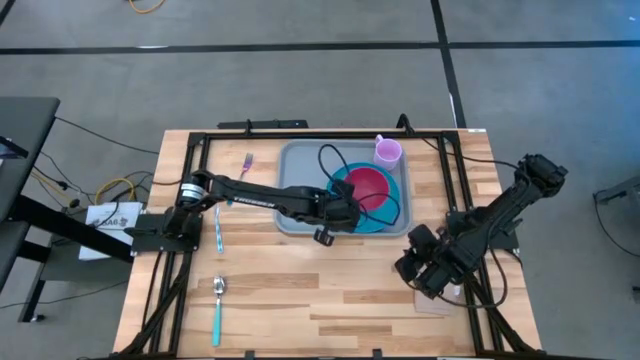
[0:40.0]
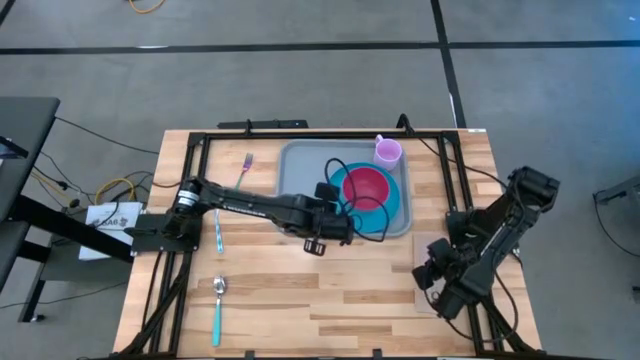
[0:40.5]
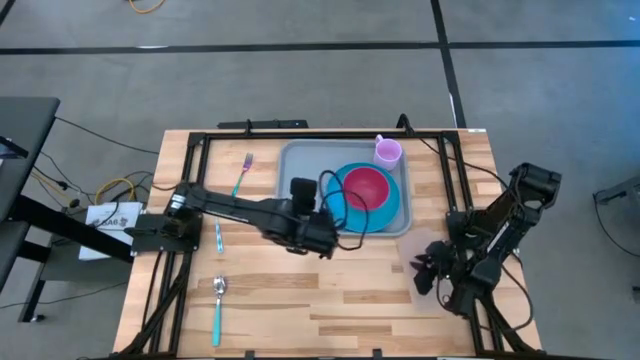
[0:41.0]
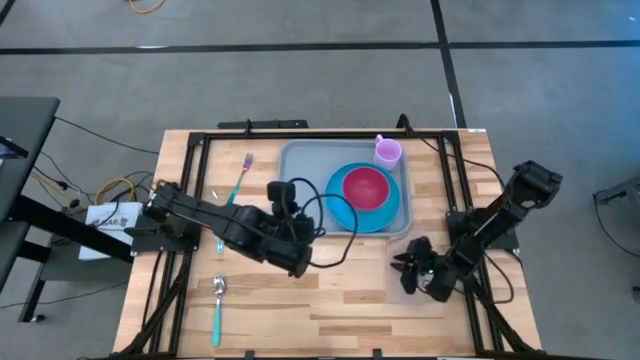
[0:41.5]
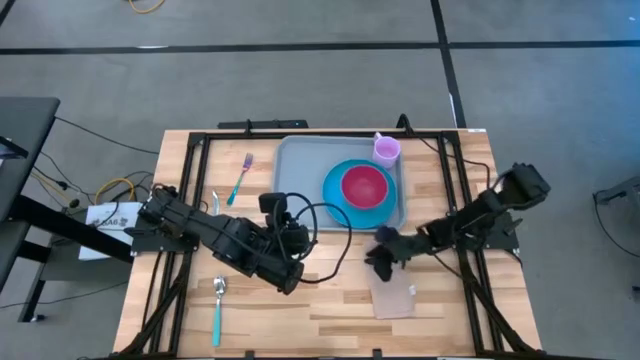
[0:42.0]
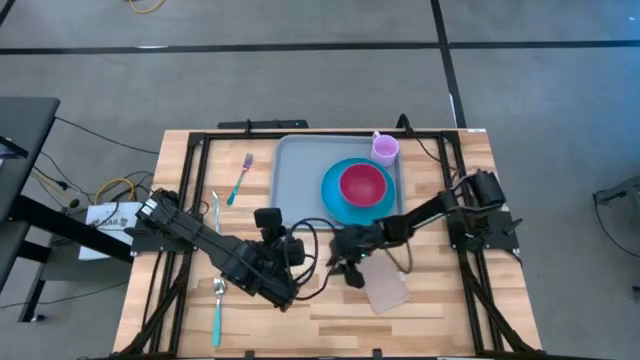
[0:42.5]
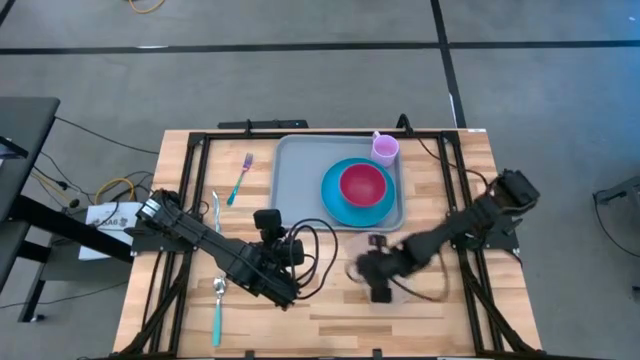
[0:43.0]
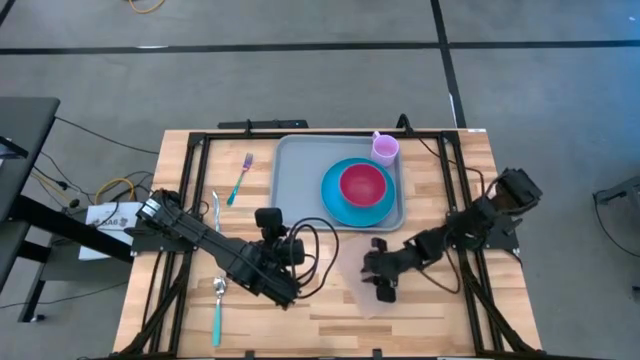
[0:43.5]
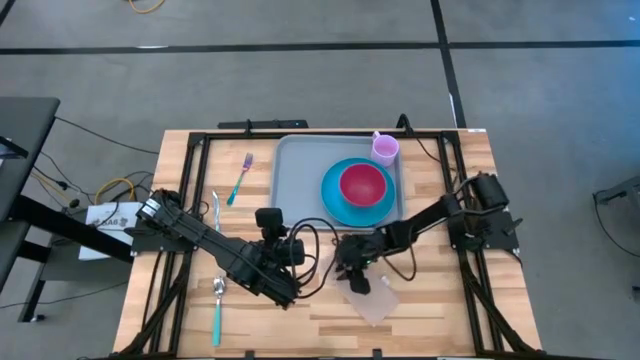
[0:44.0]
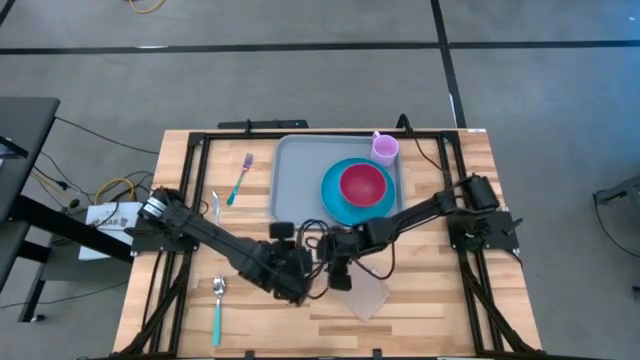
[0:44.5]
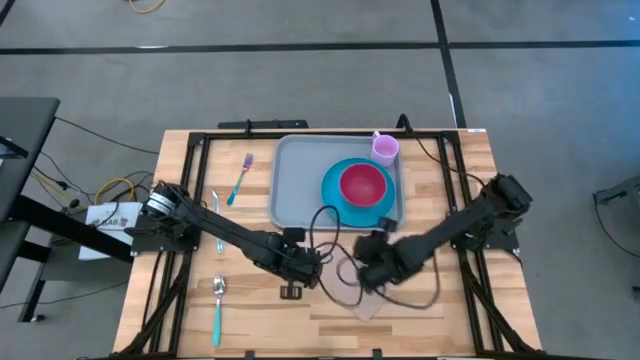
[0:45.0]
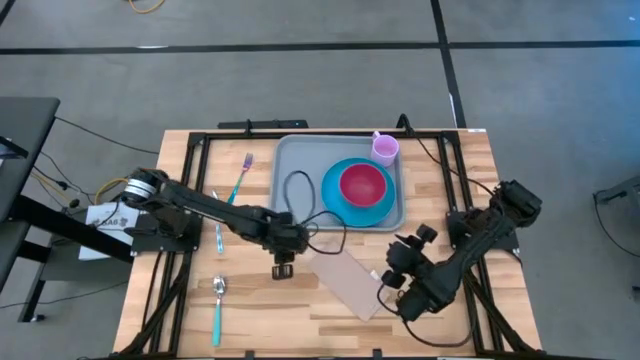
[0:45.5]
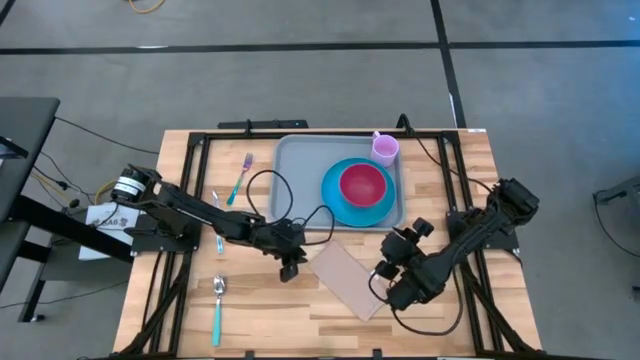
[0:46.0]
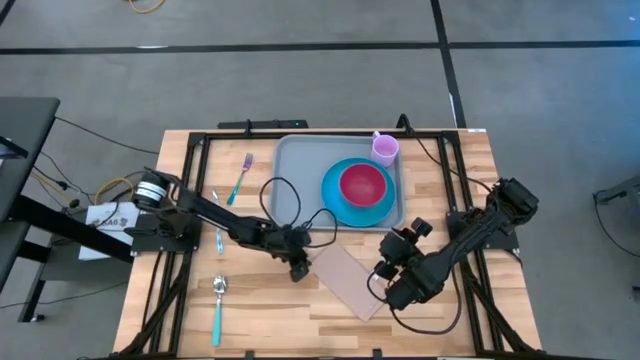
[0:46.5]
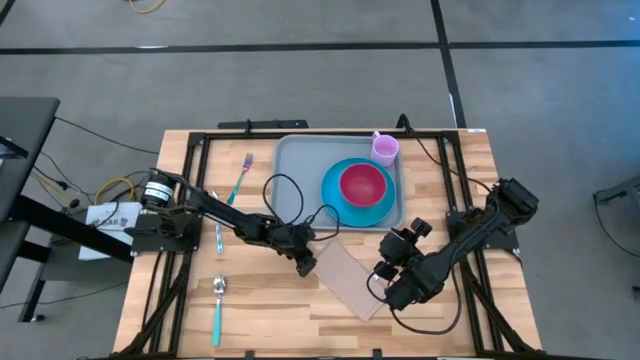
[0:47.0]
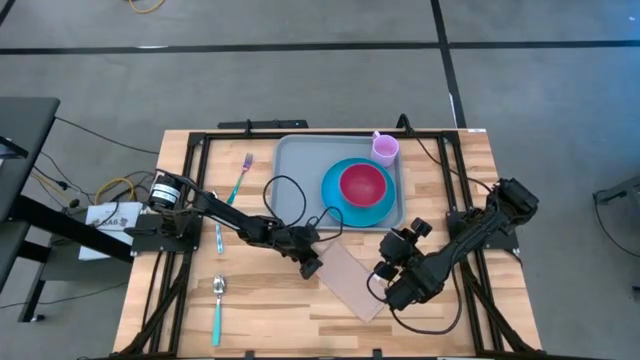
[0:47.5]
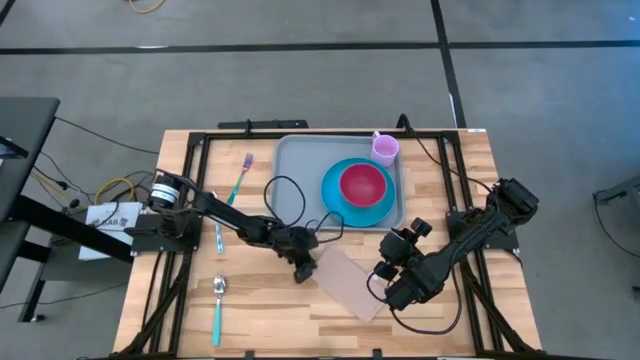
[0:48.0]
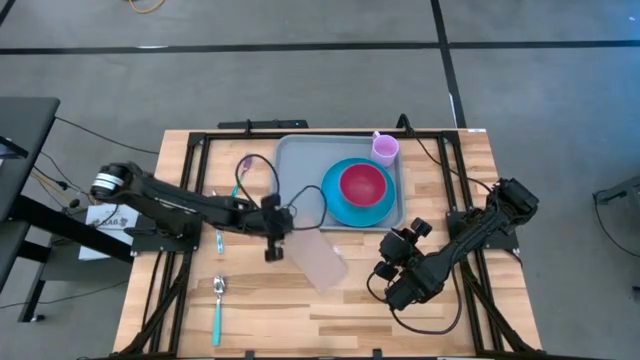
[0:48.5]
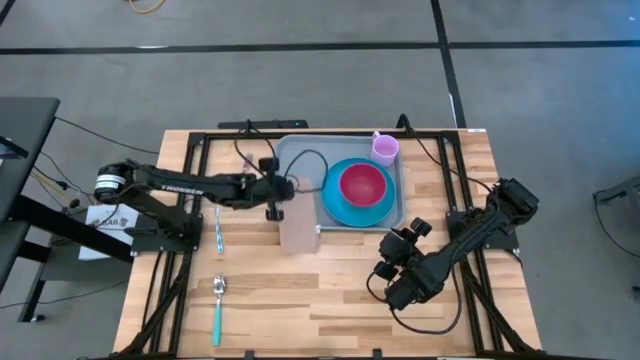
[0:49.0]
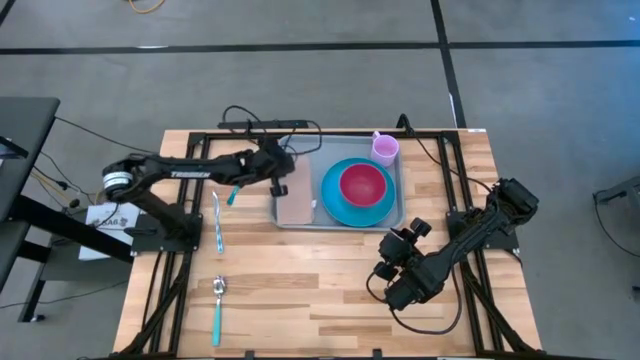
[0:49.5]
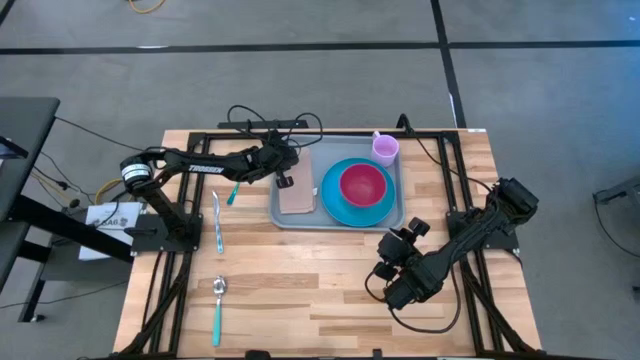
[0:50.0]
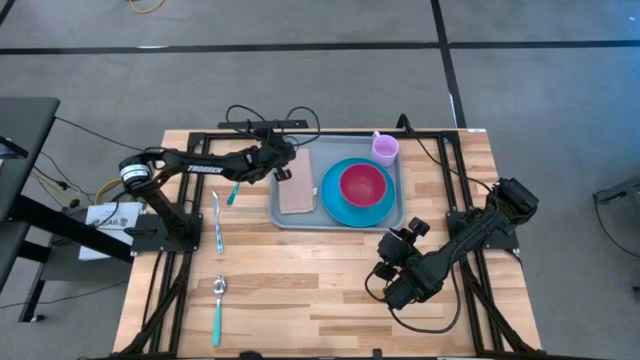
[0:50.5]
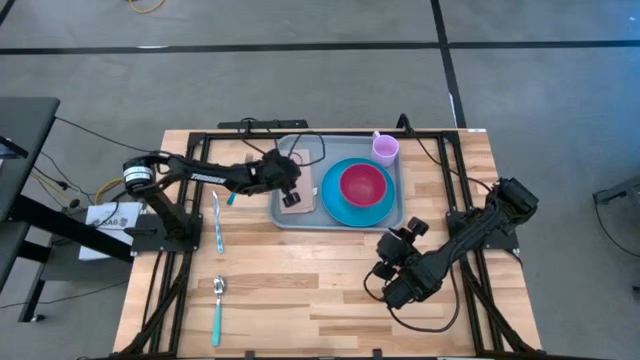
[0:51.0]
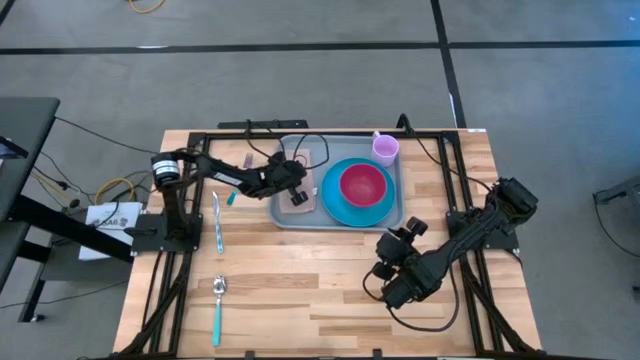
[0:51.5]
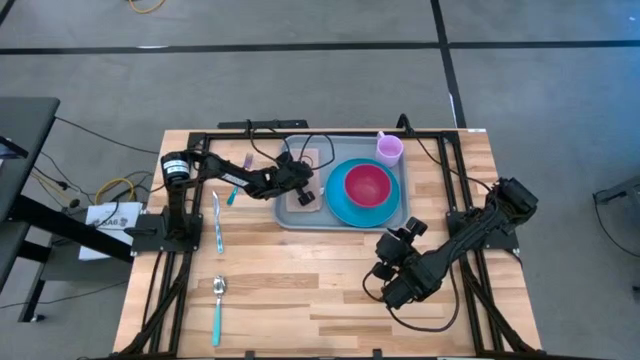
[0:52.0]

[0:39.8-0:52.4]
Task: Set up tray
Put the brown napkin to the left of the blue plate on the gray tray

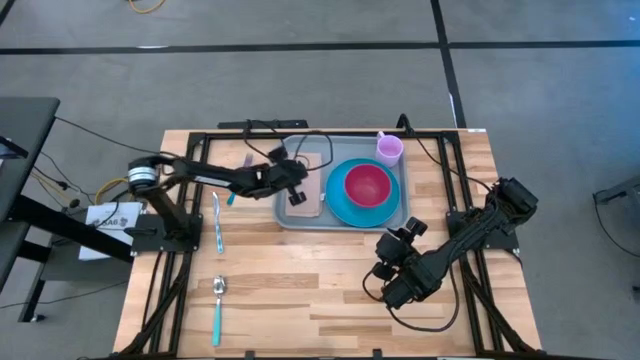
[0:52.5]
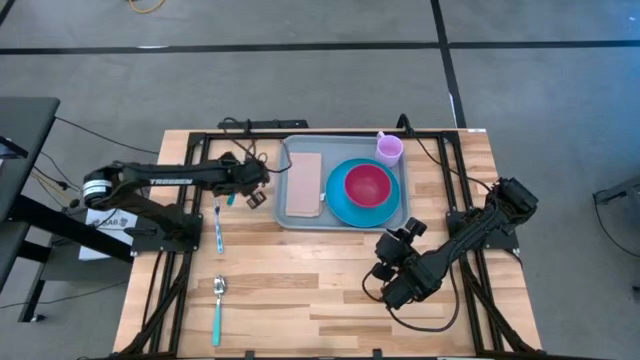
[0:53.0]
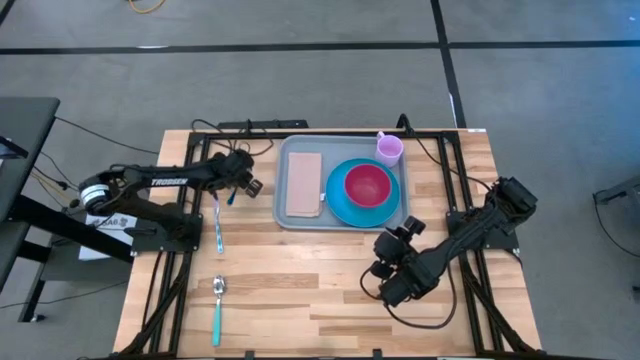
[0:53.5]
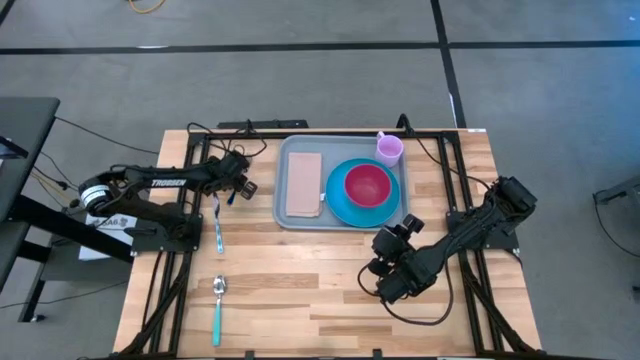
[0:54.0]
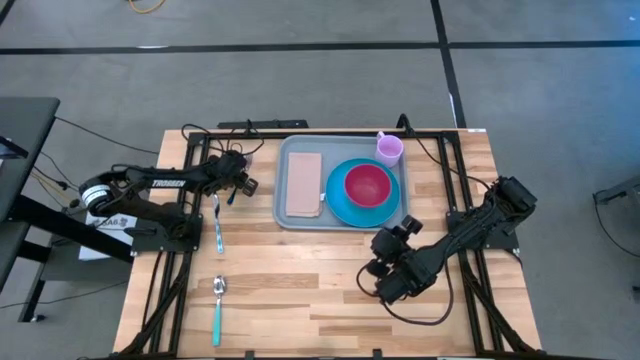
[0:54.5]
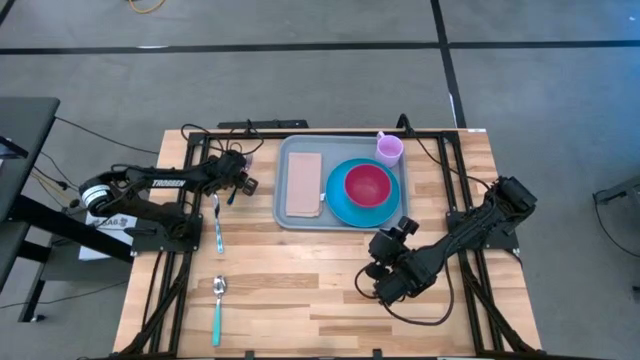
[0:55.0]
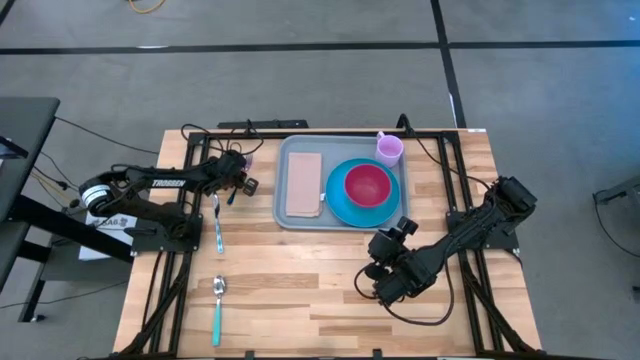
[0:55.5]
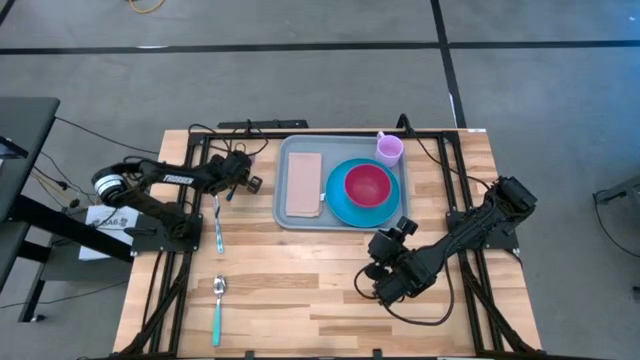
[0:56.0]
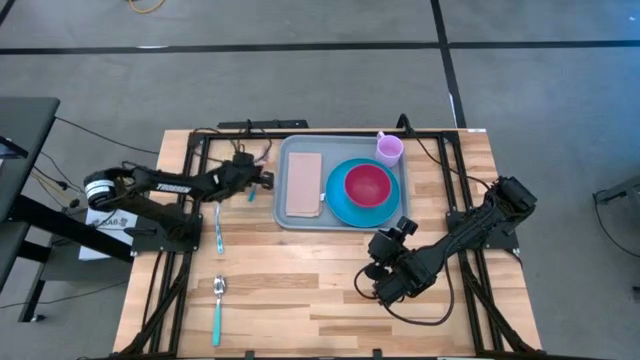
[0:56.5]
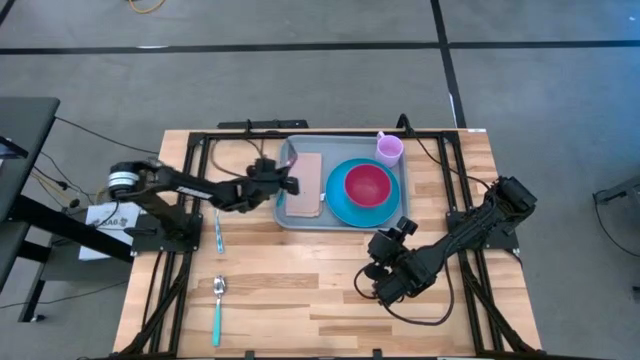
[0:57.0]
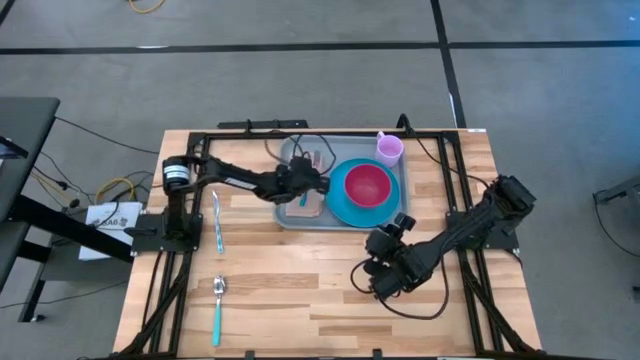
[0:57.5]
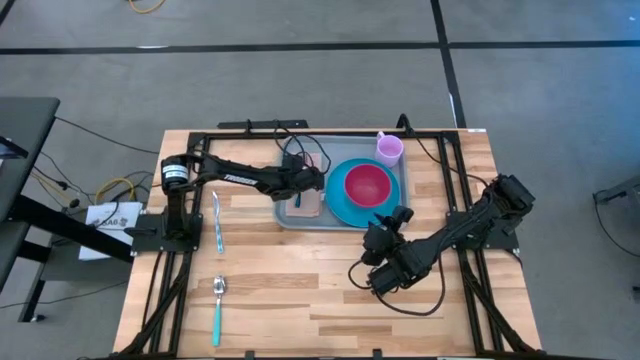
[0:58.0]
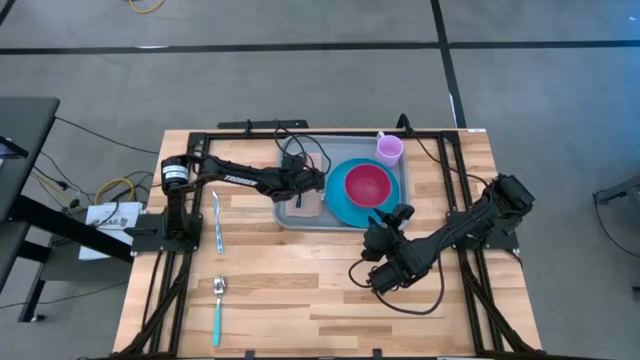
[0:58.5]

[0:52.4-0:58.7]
Put the blue fork on the brown napkin

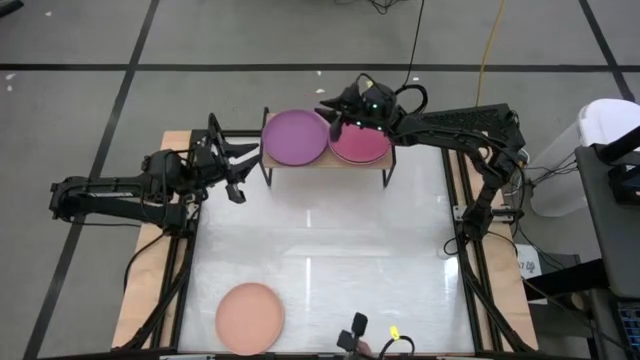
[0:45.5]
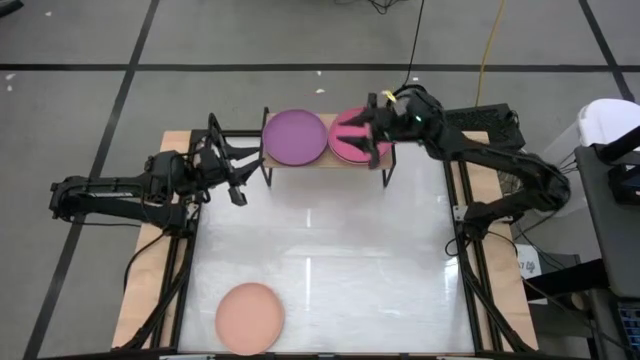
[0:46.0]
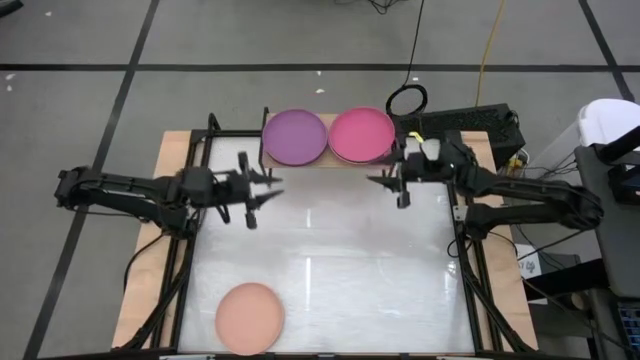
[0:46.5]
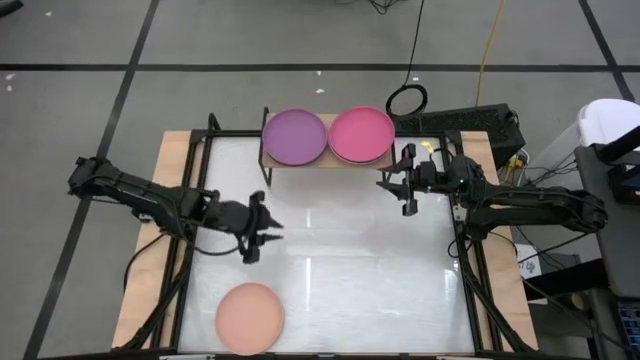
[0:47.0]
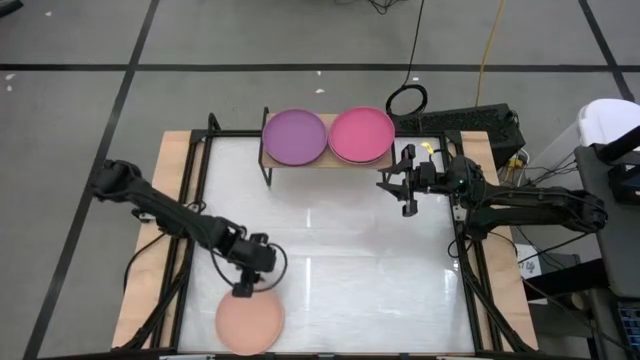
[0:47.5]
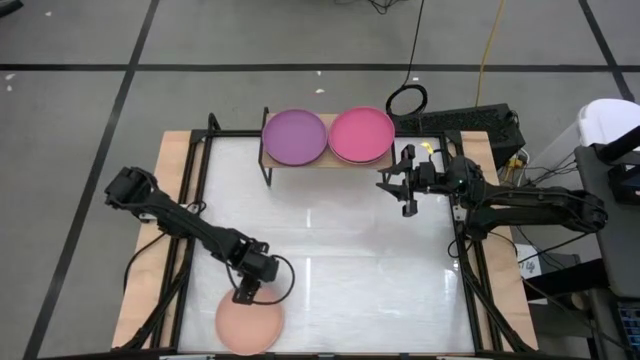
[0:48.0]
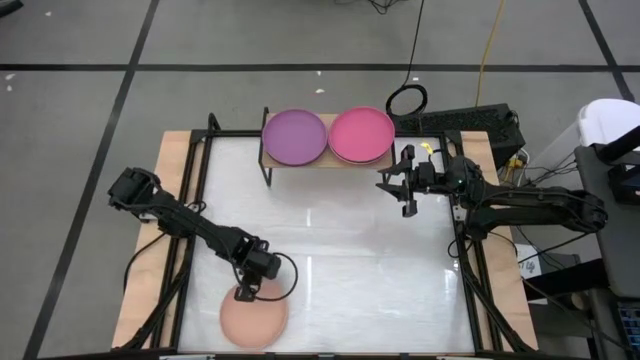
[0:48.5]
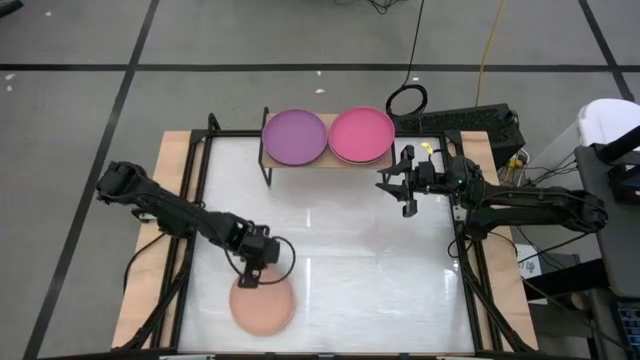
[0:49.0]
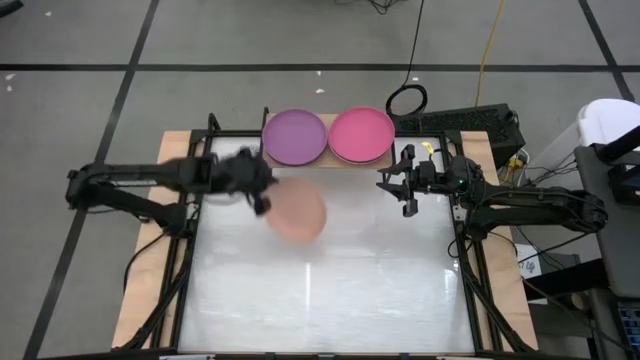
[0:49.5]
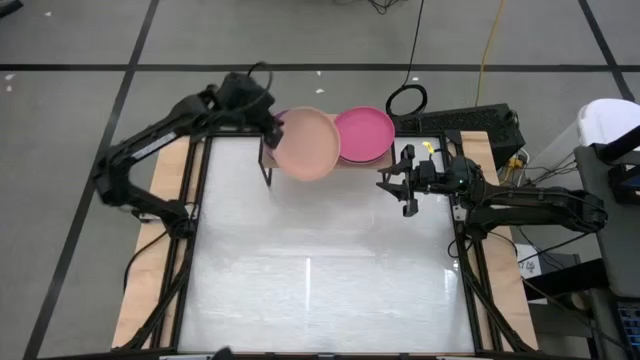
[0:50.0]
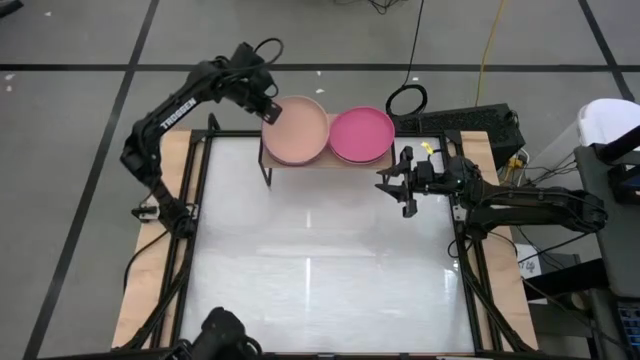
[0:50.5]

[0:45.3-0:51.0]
Task: Place and stack plates onto a shelf
Stack the light orange plate on top of the purple plate on the shelf
